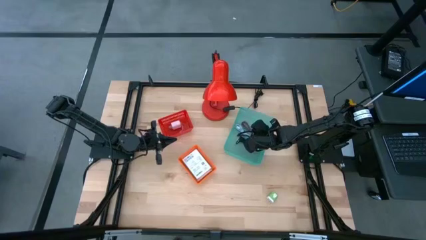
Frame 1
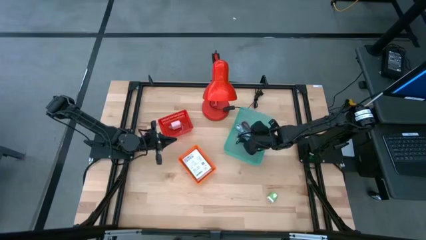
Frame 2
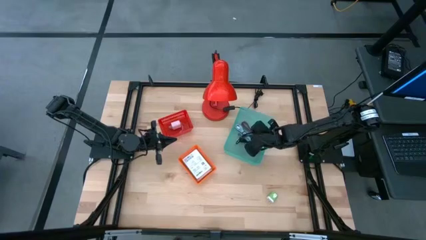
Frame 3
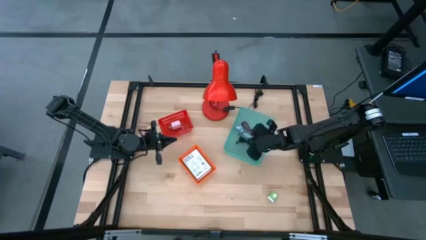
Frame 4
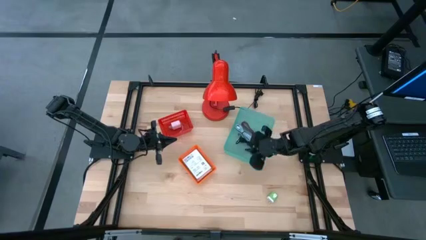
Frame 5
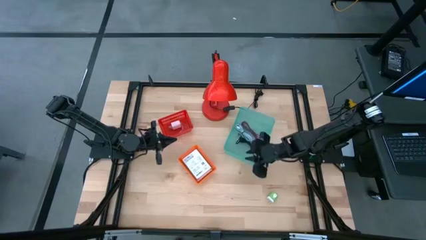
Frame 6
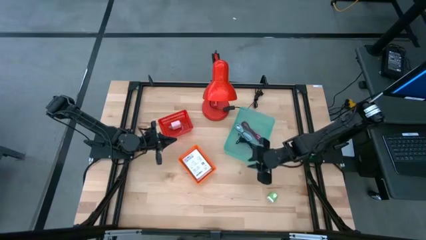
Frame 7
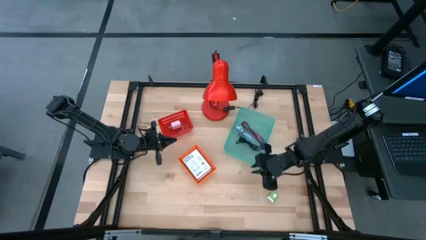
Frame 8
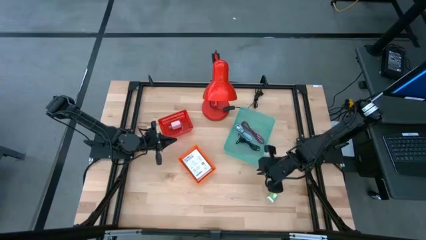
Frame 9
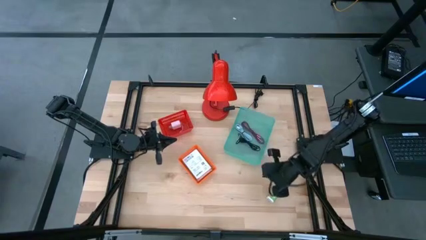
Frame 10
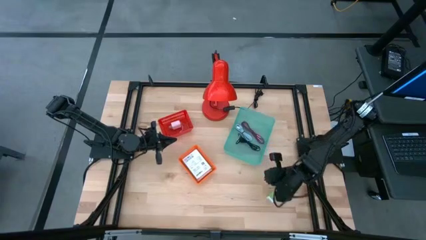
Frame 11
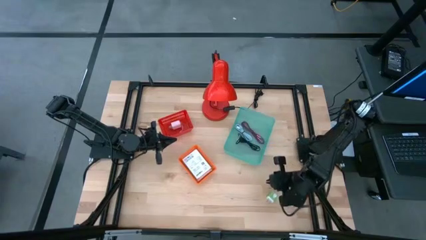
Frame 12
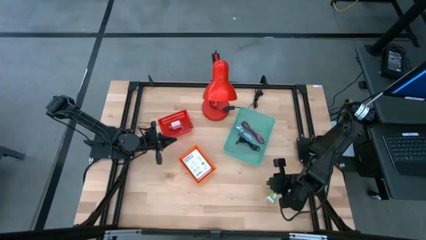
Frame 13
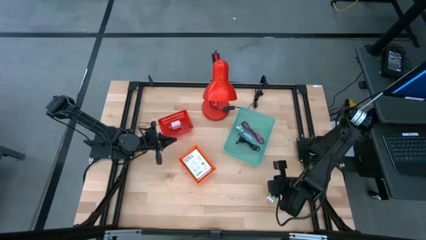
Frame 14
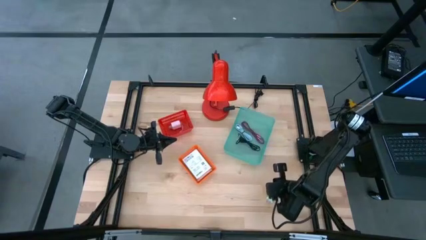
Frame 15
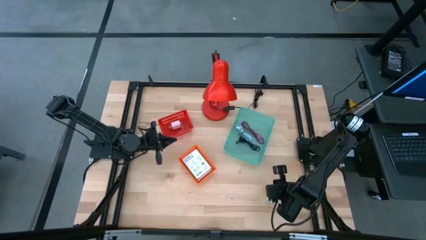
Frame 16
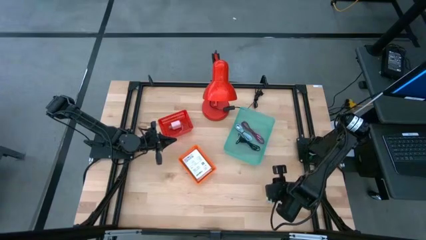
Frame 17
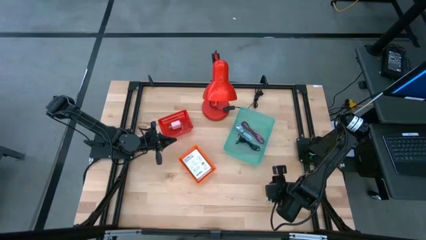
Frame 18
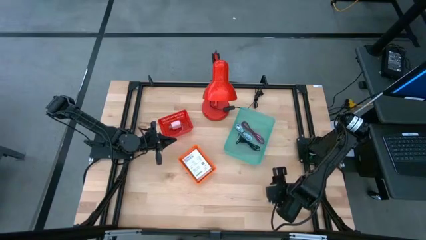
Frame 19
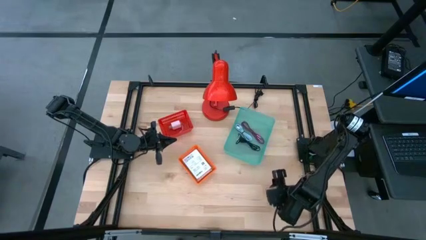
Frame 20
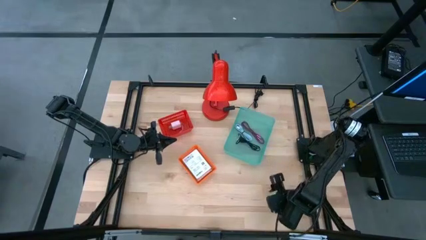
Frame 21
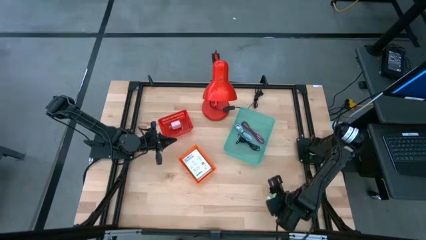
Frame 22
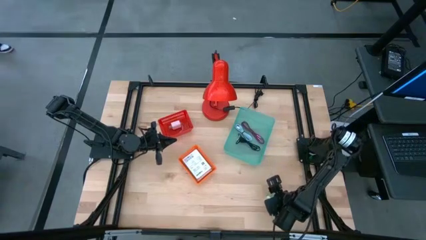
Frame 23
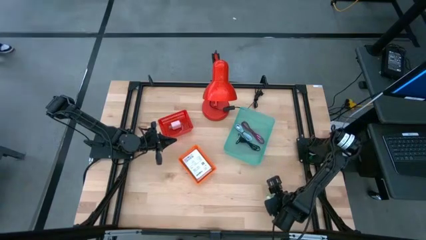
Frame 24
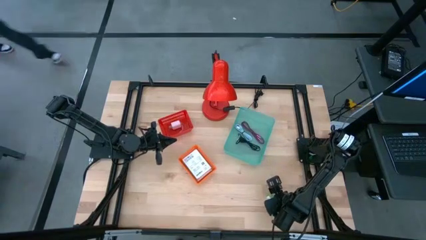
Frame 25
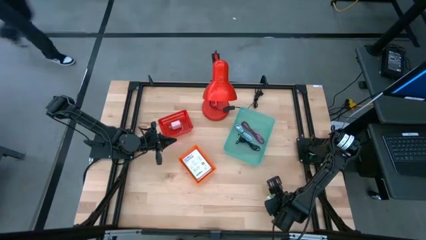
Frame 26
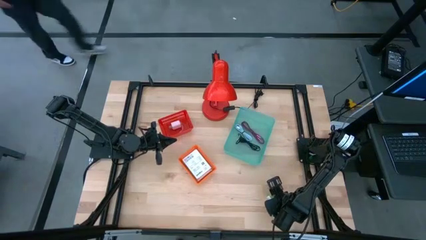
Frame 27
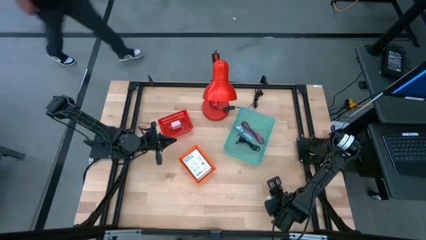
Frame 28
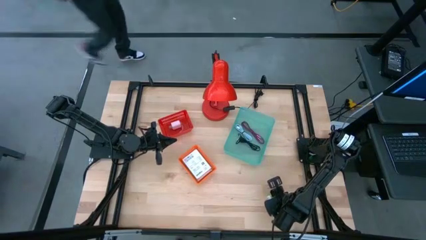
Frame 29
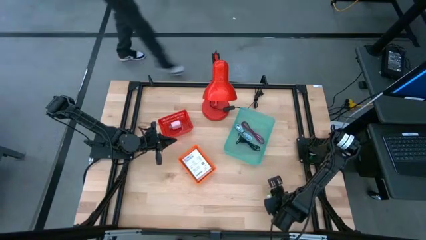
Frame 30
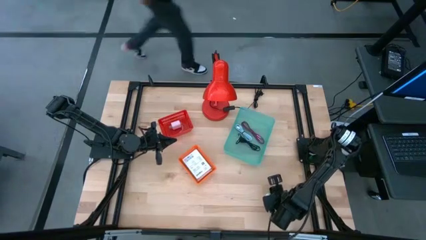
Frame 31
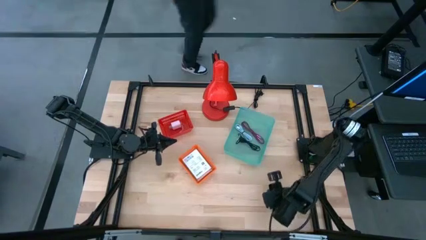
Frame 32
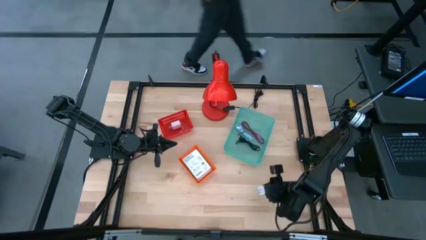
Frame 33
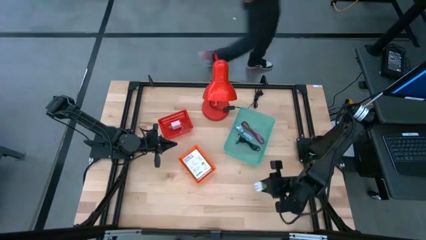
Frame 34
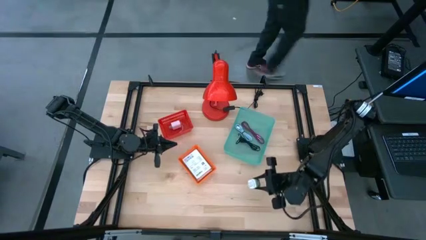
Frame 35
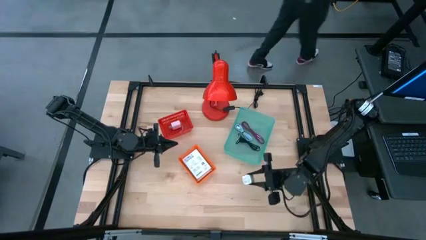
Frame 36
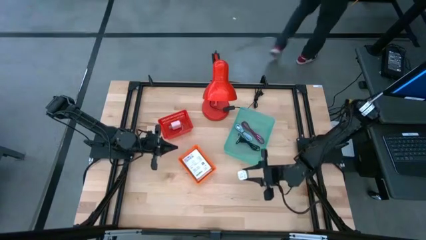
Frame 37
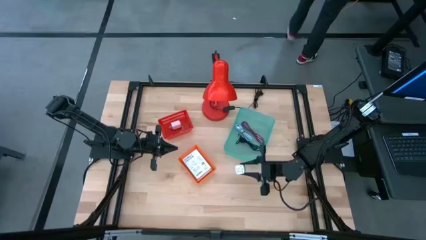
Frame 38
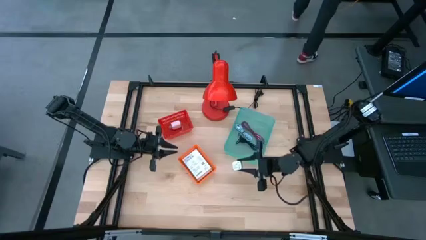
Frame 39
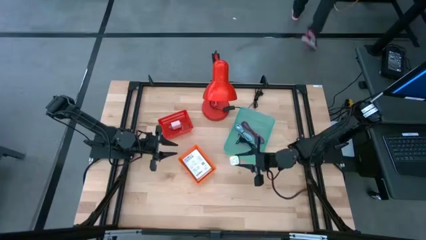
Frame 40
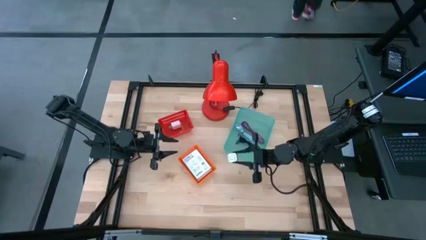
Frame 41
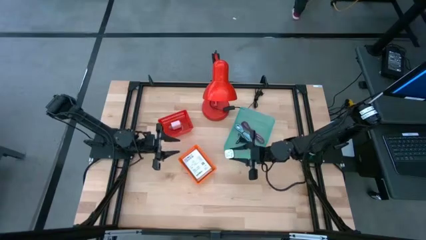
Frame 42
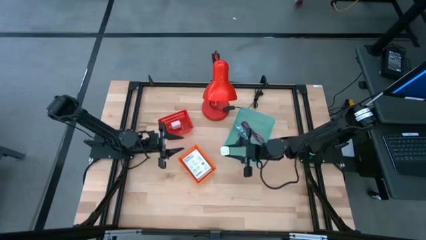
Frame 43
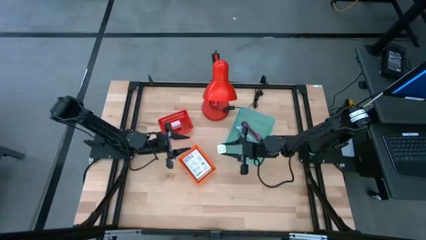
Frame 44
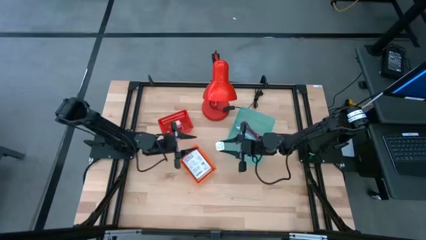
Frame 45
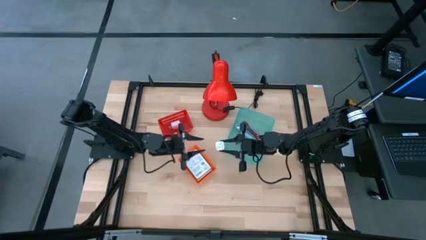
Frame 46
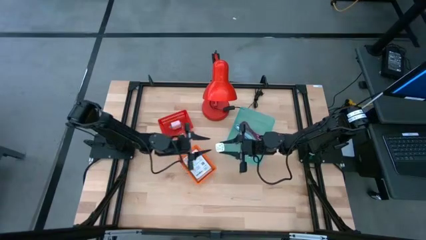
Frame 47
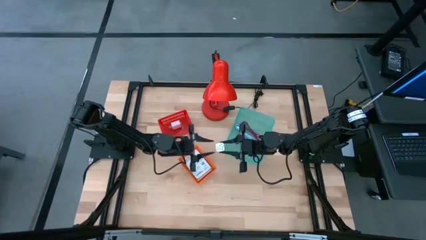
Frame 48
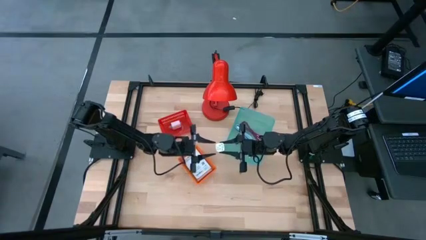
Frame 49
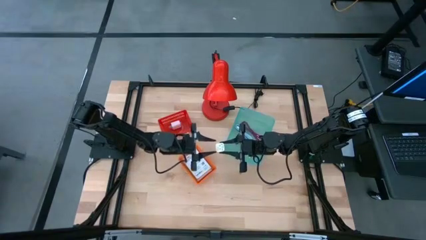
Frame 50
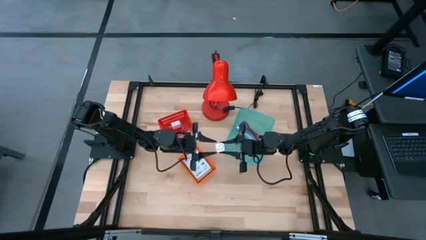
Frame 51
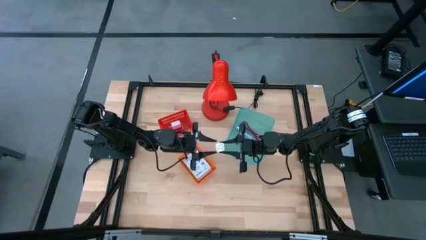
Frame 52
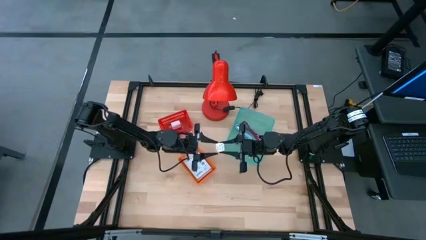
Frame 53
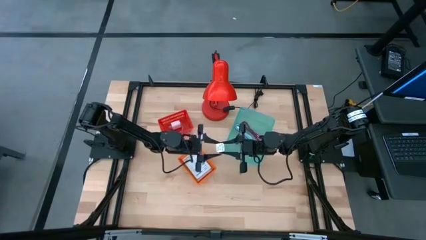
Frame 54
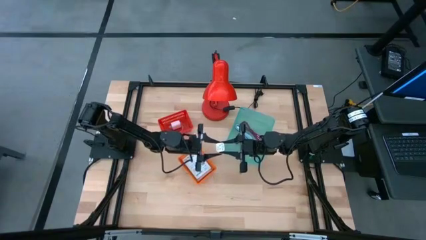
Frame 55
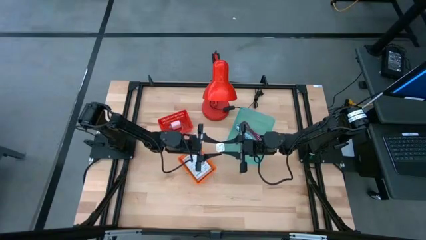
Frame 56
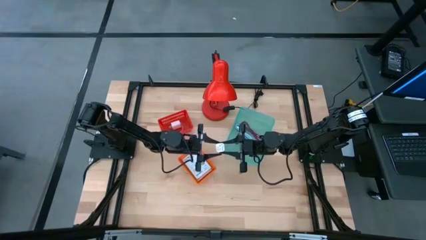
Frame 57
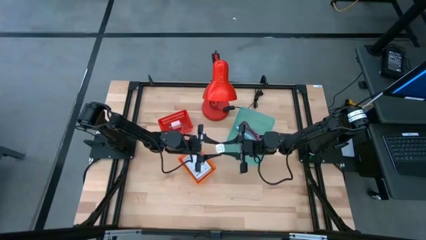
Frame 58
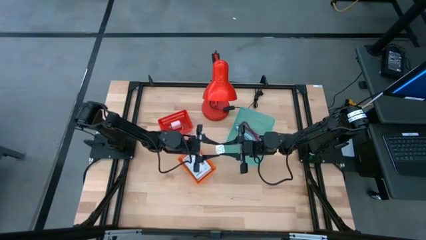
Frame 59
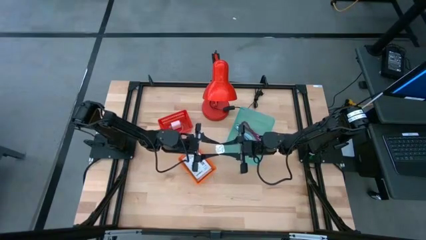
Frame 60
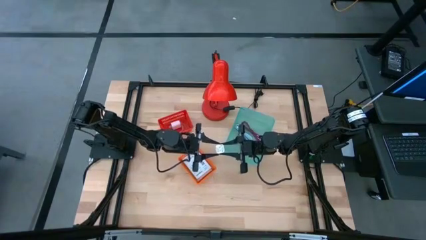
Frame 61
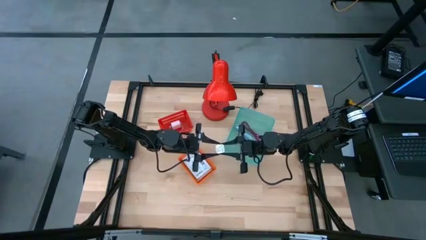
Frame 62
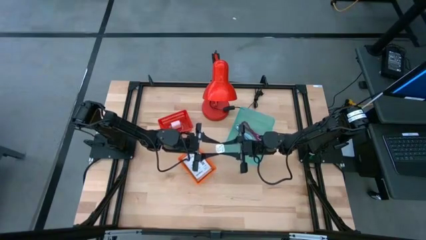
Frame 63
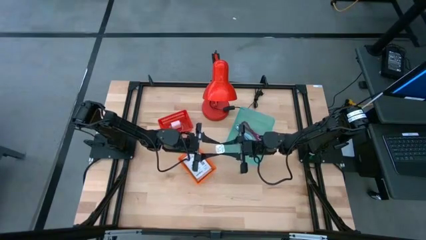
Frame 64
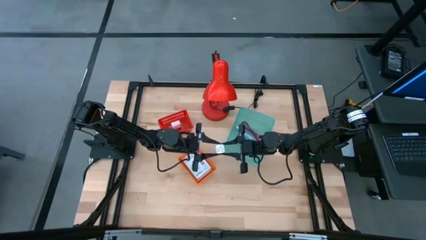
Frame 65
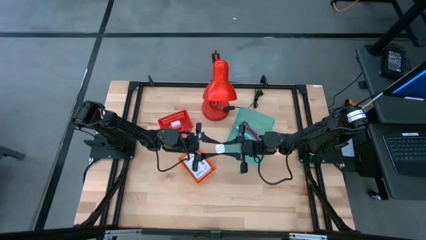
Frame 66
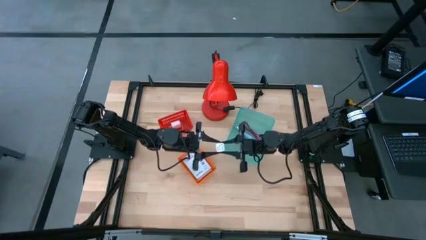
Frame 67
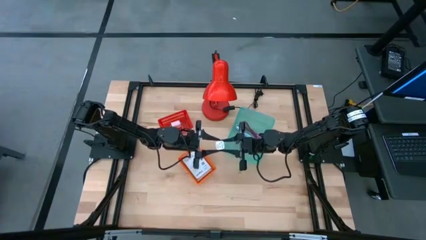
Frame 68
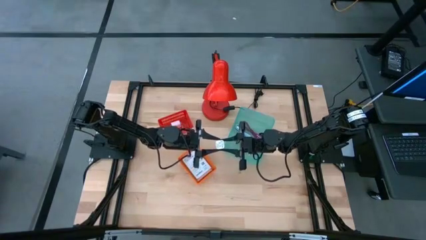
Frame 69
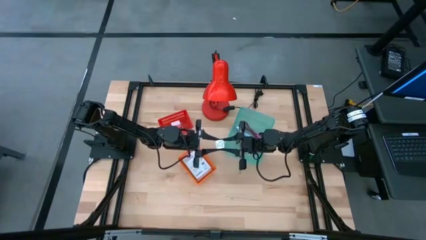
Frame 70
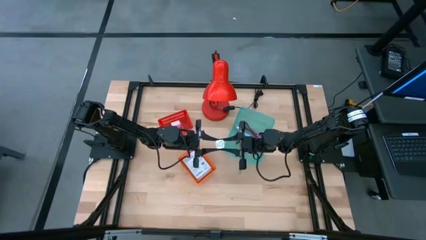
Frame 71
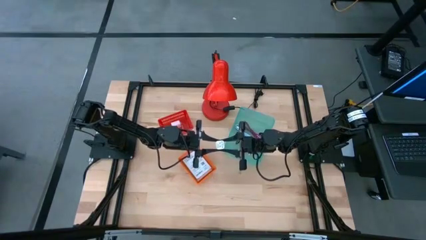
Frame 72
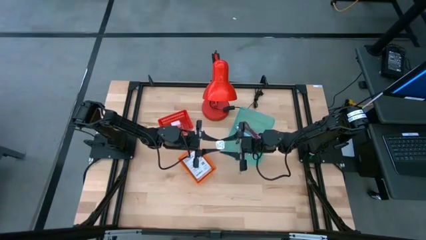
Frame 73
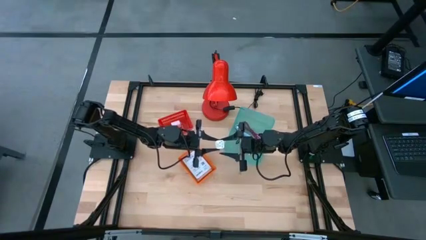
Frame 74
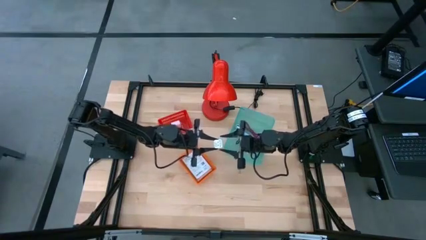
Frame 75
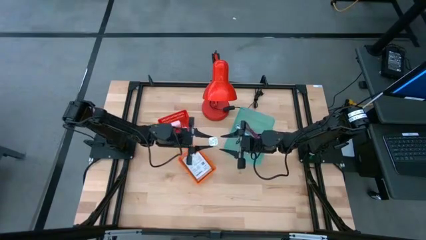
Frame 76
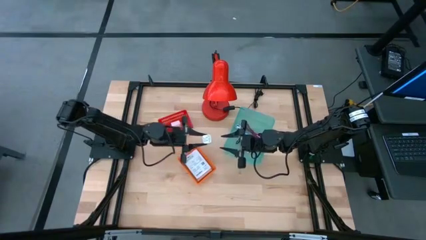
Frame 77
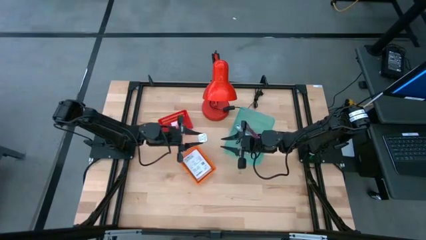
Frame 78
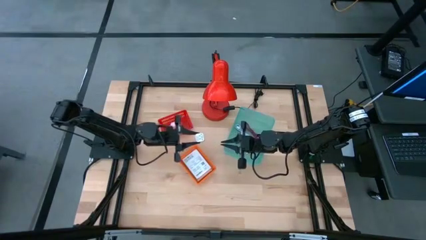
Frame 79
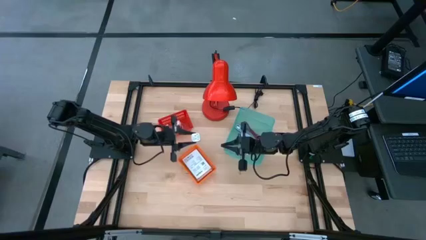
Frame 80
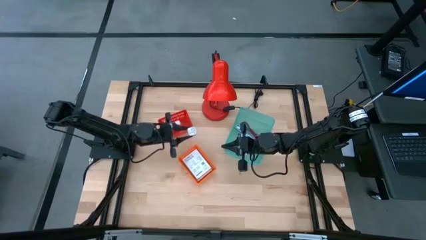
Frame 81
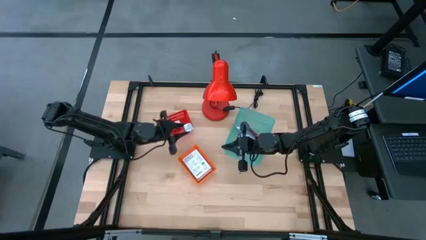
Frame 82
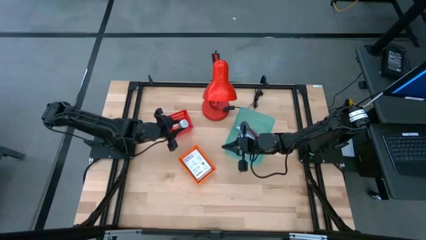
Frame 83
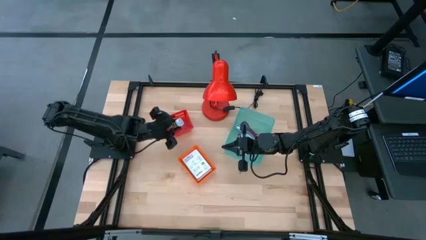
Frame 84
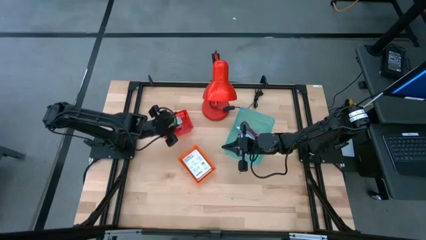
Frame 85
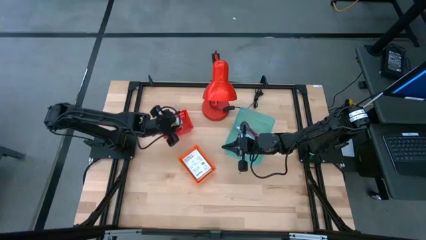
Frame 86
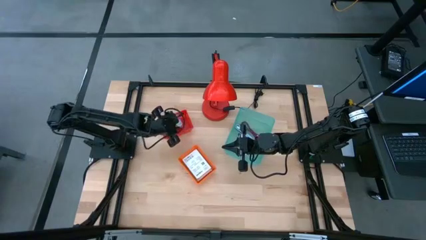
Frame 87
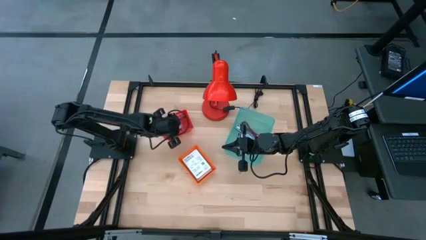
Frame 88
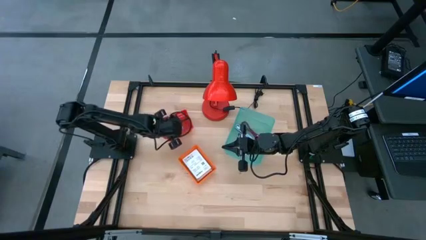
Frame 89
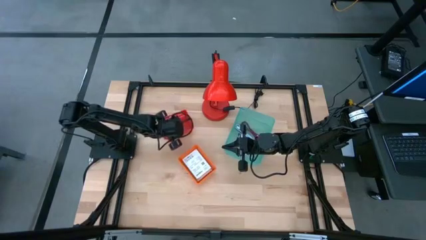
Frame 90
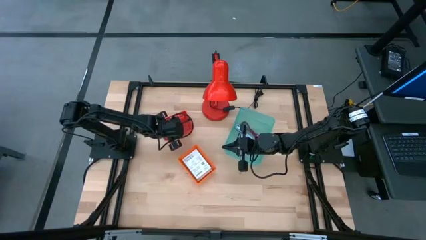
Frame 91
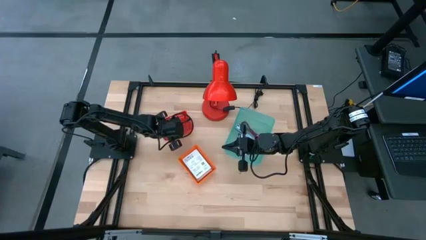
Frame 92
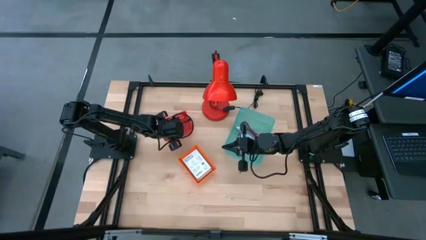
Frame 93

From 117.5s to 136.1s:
Task: Pick and place items into bin
Put the green charger adapter into the red bin
